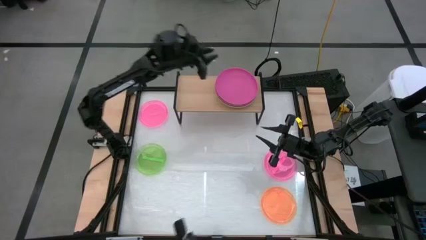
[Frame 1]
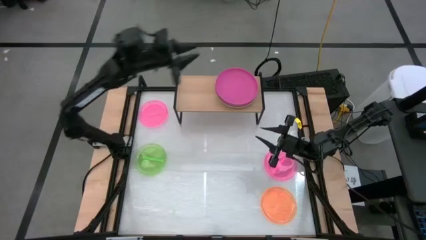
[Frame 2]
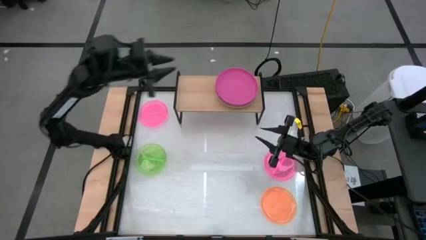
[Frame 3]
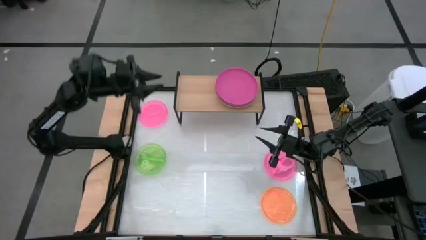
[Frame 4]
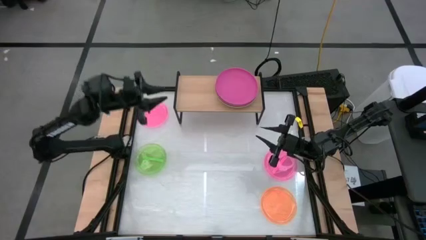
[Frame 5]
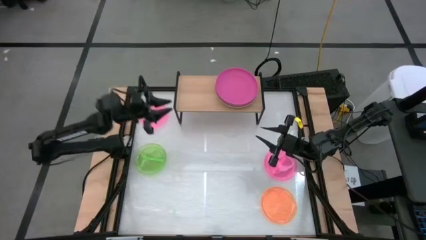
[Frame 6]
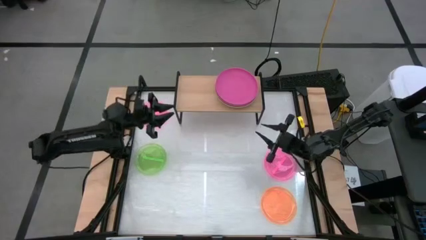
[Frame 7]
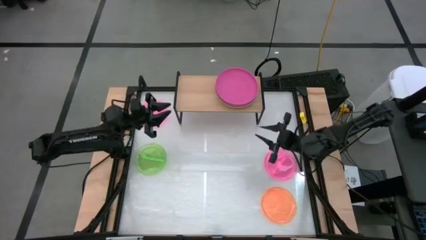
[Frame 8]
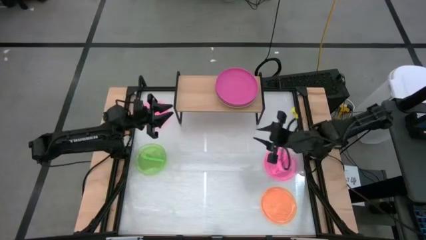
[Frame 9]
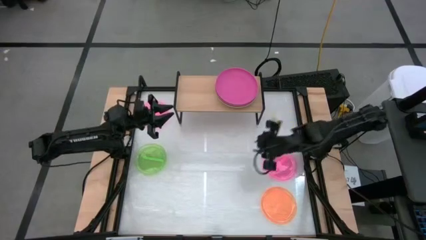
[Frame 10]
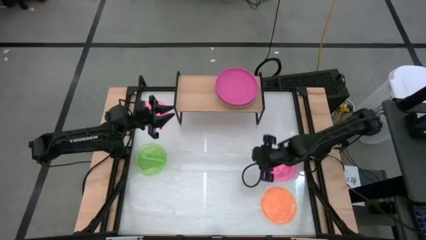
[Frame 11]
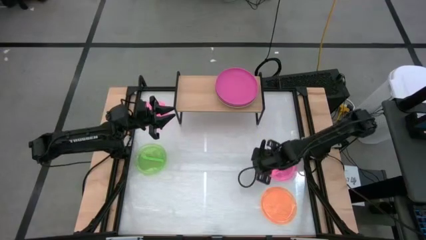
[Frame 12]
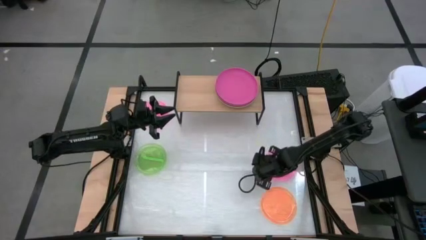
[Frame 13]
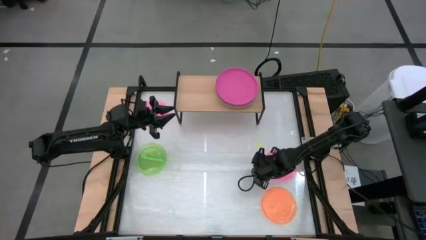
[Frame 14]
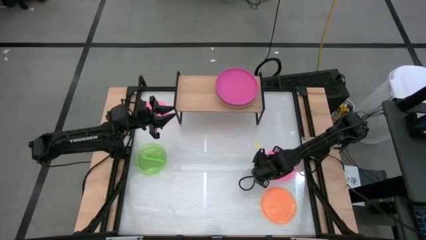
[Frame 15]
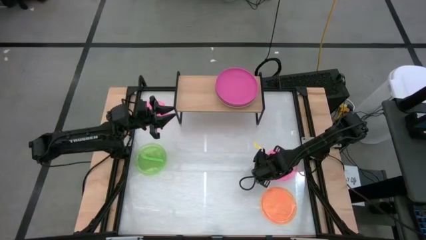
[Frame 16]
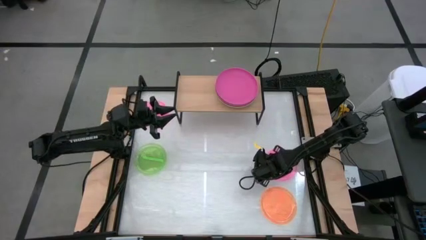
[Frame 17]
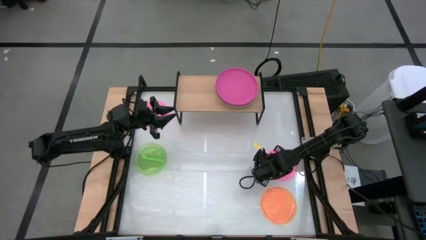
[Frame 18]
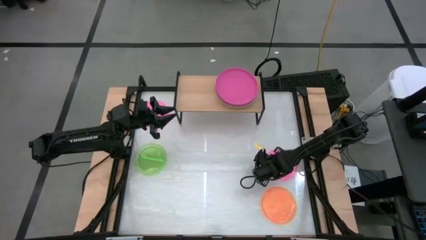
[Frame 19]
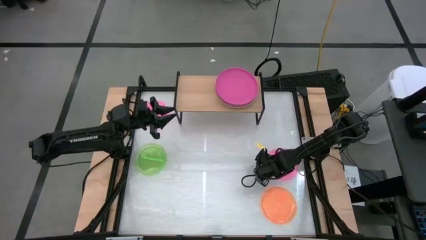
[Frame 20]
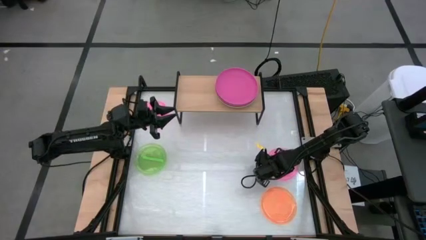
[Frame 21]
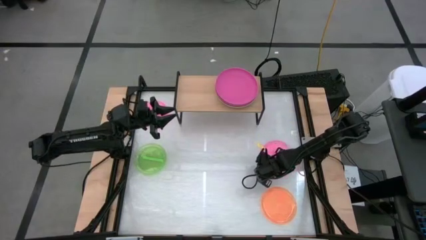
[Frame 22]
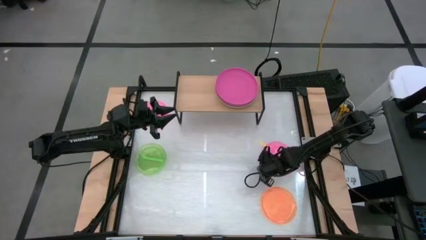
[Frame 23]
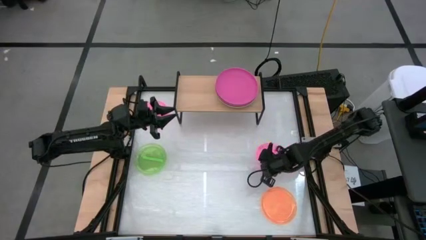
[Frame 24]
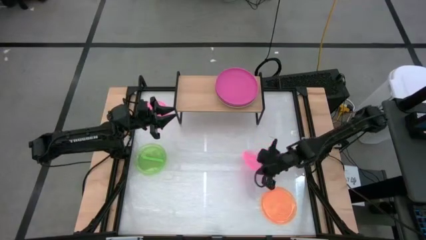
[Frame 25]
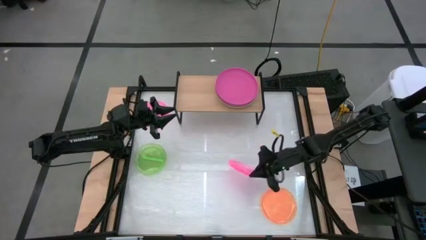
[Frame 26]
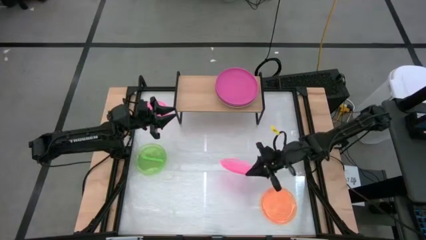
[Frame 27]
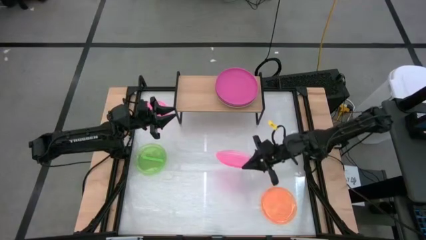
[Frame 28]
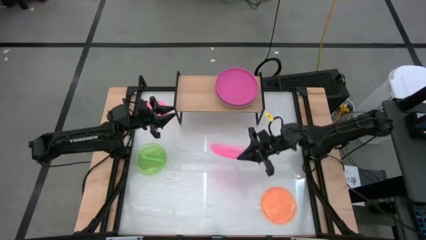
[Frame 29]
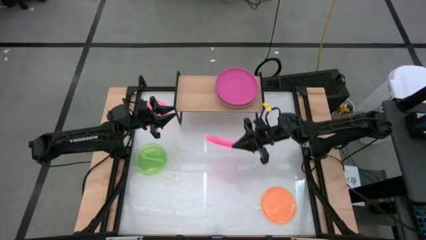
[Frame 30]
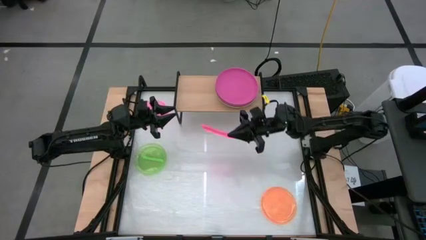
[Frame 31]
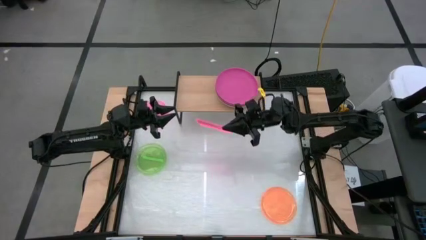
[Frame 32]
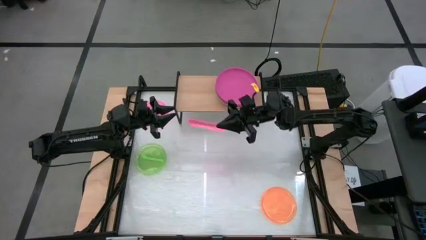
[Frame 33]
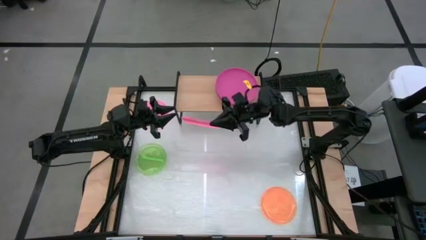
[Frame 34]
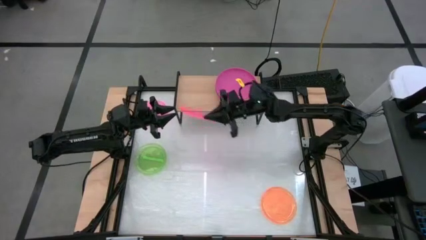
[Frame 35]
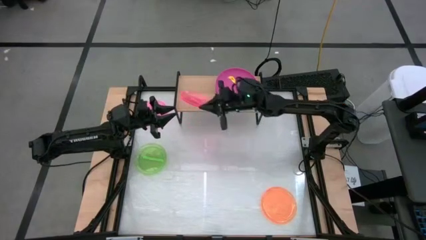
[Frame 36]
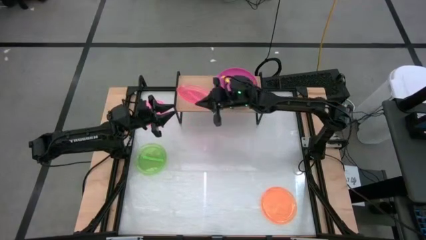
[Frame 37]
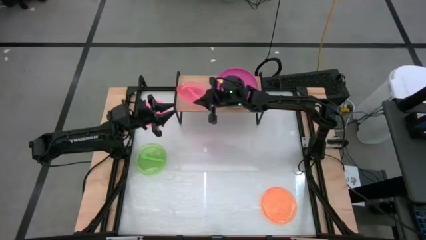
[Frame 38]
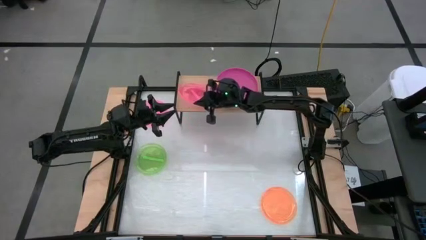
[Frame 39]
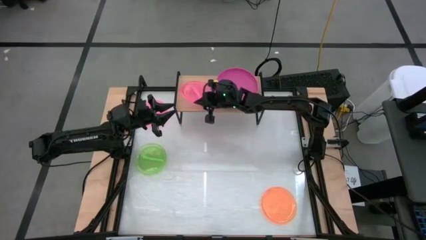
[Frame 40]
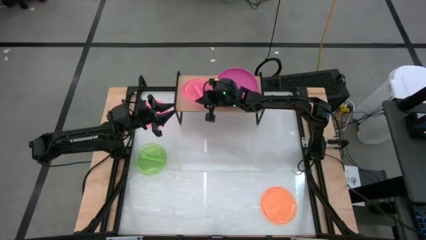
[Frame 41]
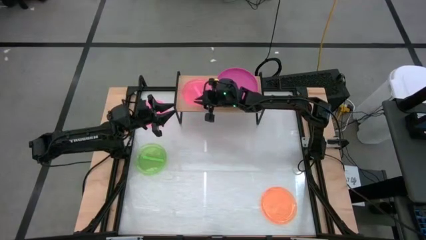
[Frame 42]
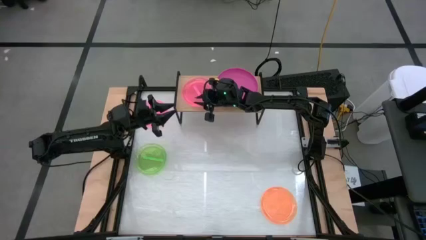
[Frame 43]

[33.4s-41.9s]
Task: Place and stack plates onto a shelf
Put the right pink transparent plate on the shelf

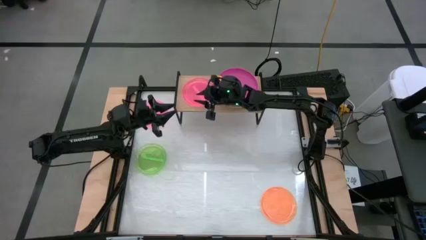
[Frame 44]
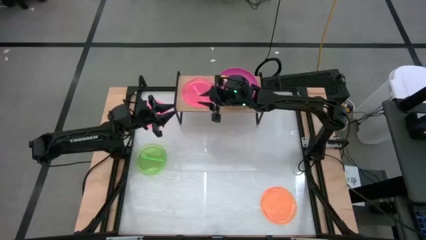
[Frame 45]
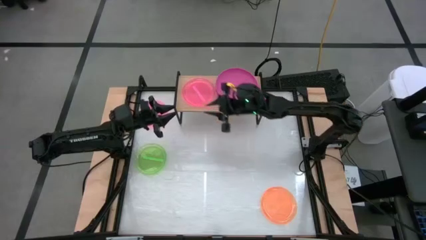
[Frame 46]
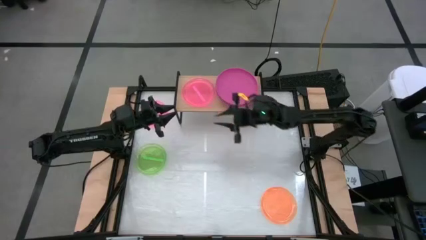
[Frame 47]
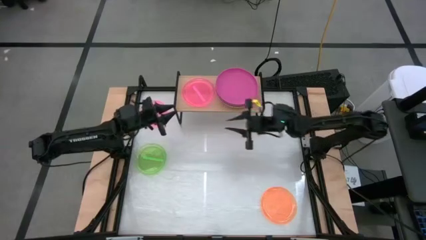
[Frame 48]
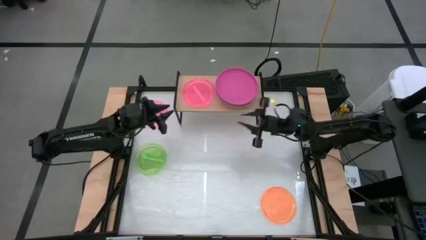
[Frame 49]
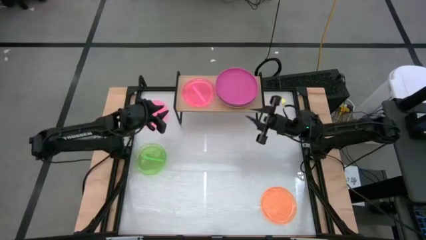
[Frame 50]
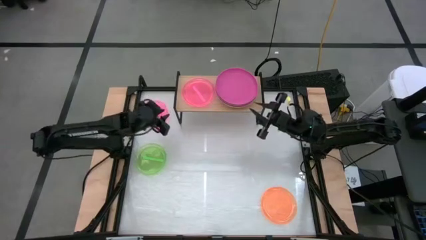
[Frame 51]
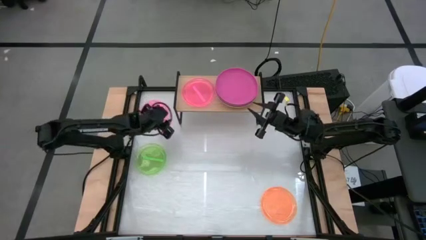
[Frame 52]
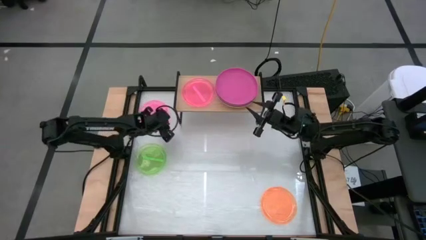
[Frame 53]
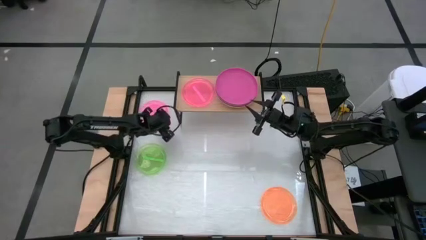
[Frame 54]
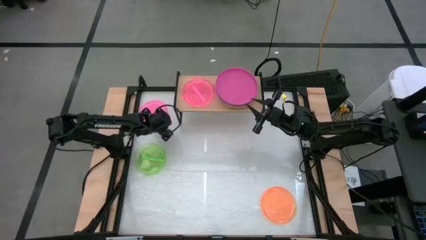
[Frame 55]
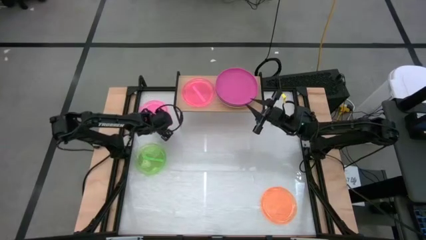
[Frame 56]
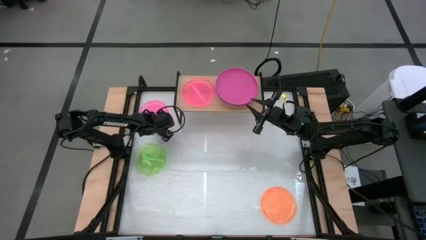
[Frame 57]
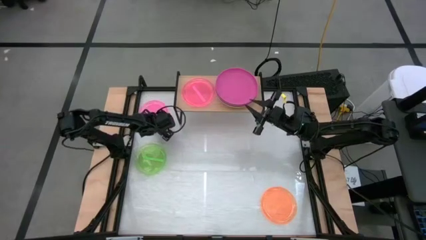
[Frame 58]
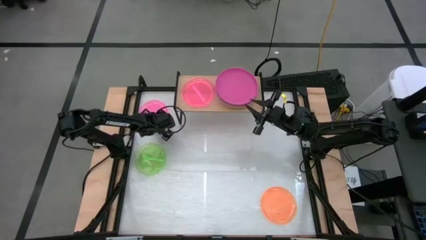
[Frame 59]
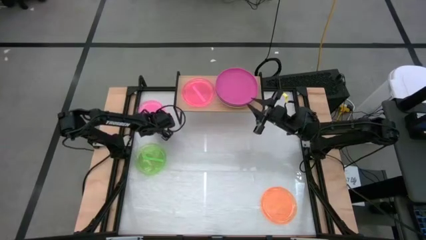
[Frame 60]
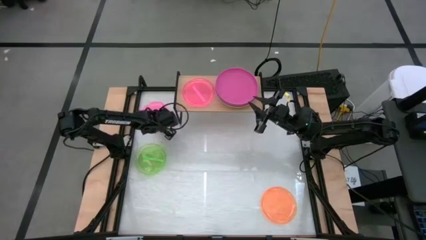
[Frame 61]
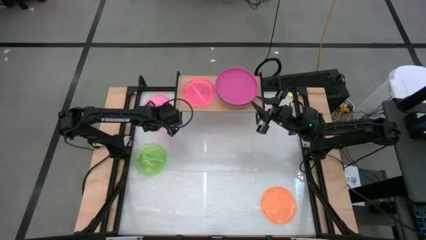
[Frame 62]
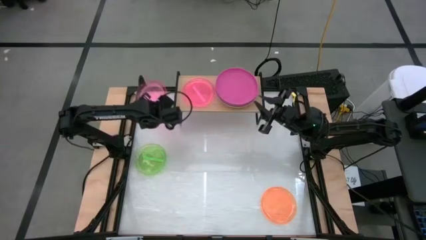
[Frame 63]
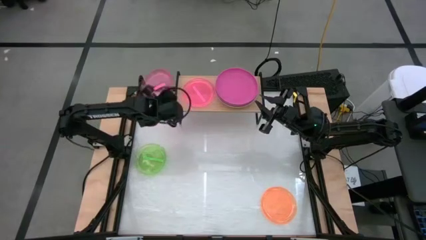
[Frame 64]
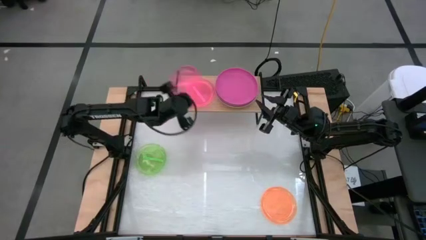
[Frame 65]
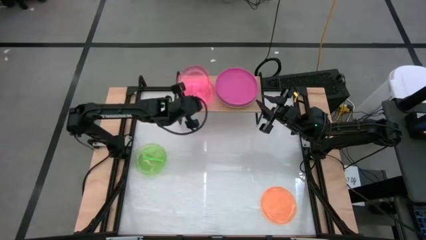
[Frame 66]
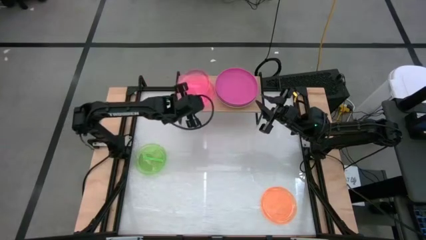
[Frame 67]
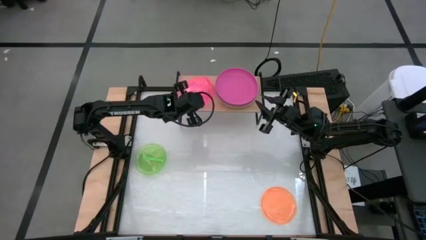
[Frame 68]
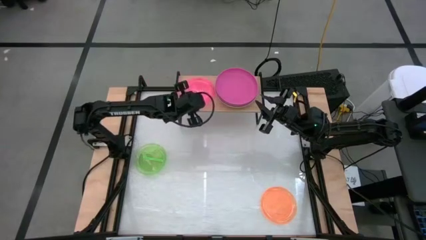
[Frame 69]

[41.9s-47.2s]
Stack the pink transparent plate on top of the pink transparent plate on the shelf

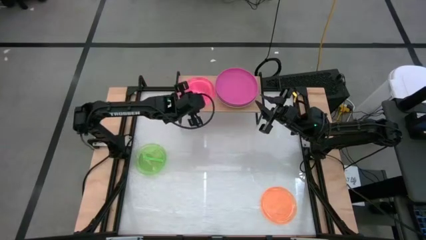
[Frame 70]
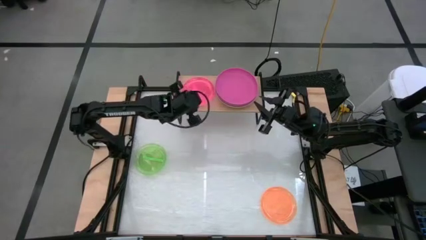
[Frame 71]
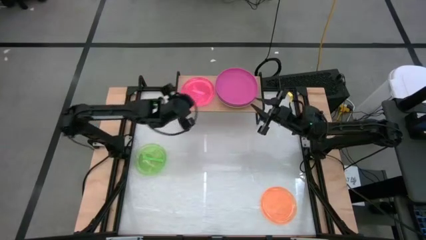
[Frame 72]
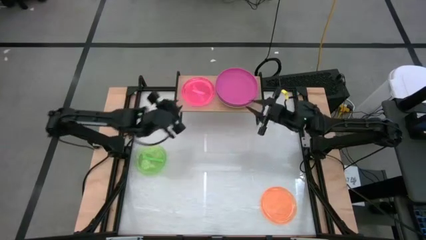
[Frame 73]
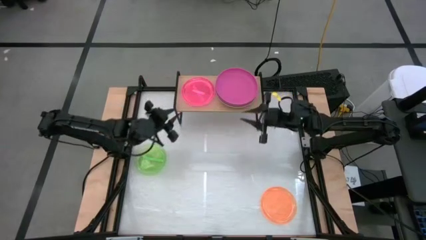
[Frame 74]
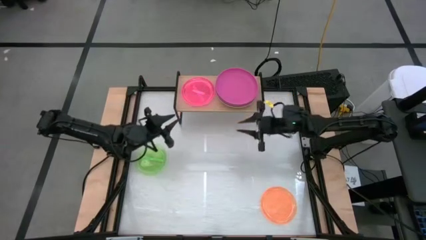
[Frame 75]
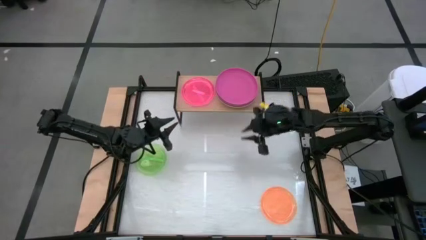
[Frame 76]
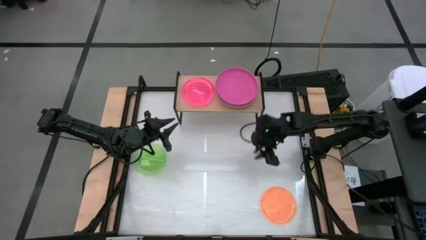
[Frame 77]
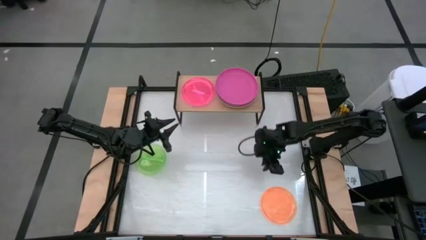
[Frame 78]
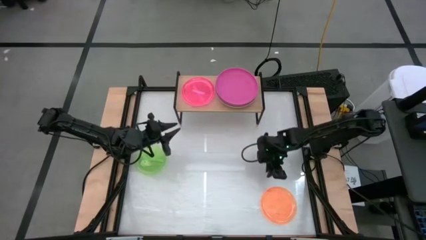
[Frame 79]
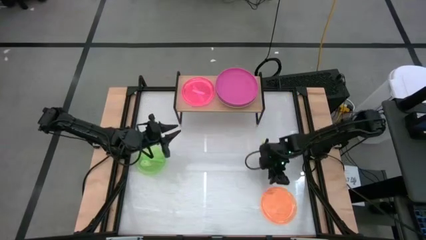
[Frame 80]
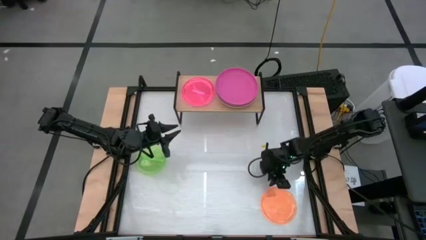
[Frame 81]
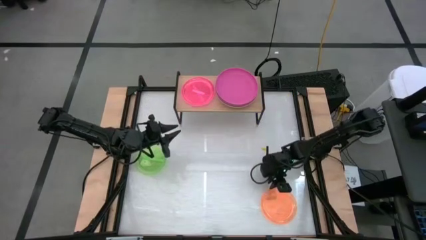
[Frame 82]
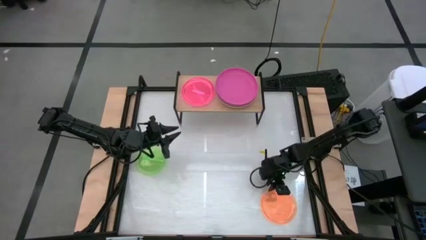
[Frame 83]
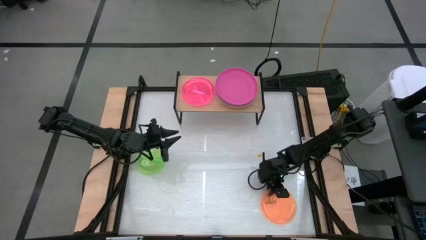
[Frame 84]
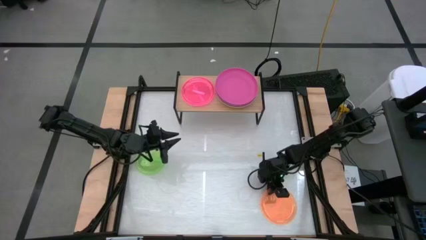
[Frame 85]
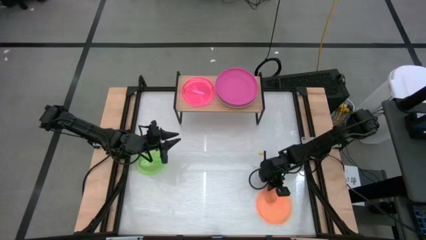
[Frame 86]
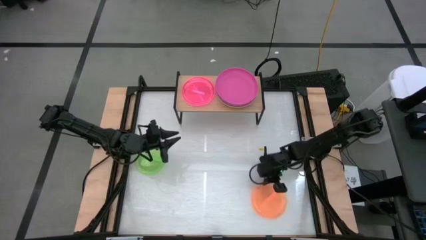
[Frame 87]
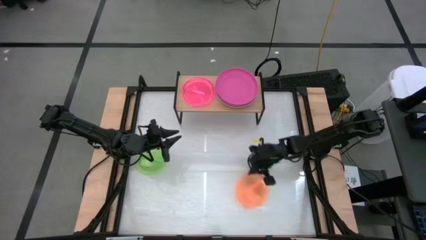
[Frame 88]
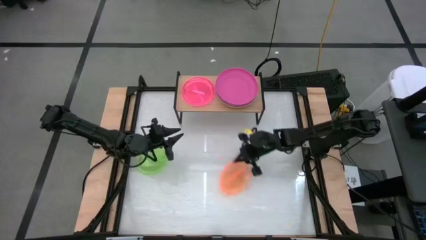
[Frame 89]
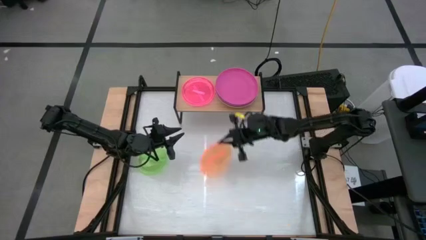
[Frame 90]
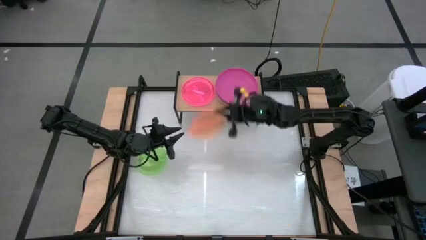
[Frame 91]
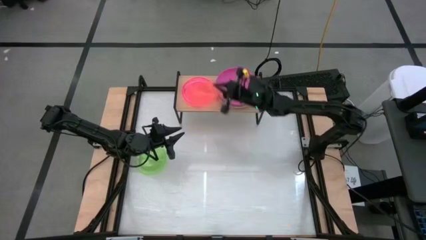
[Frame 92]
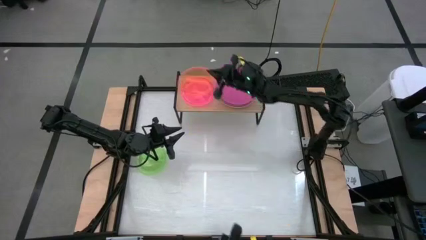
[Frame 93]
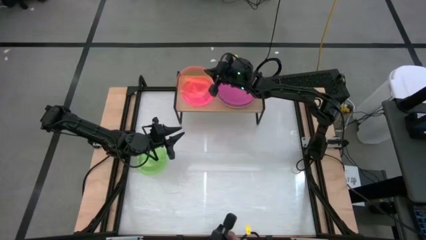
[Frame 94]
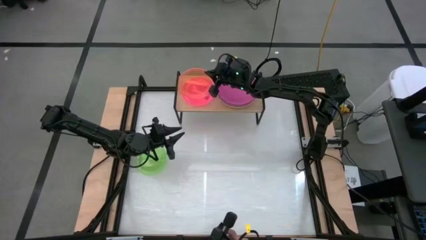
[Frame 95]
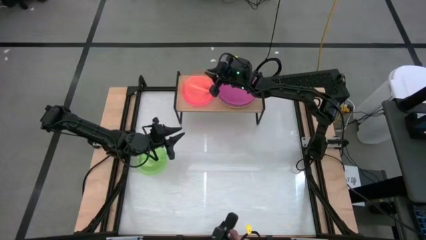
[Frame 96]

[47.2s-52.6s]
Stack the orange transparent plate on top of the pink transparent plate on the shelf
